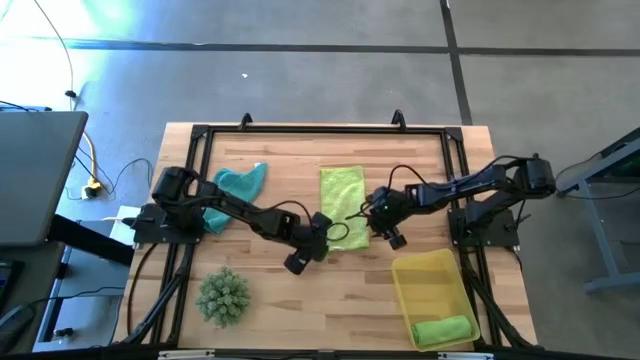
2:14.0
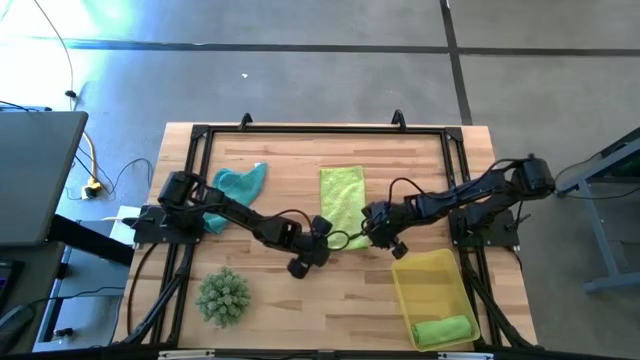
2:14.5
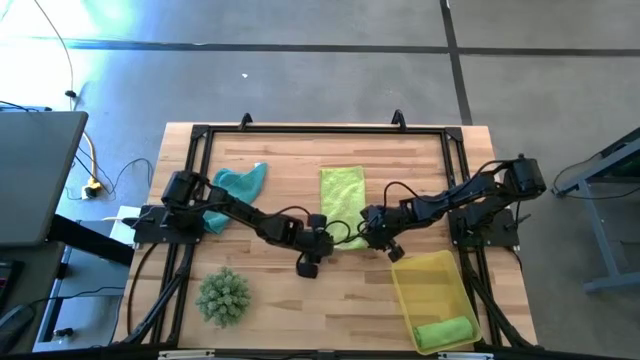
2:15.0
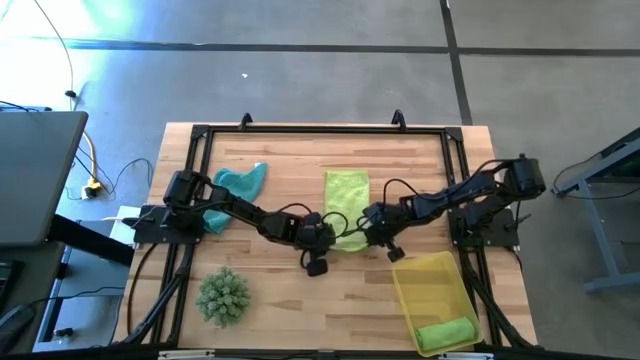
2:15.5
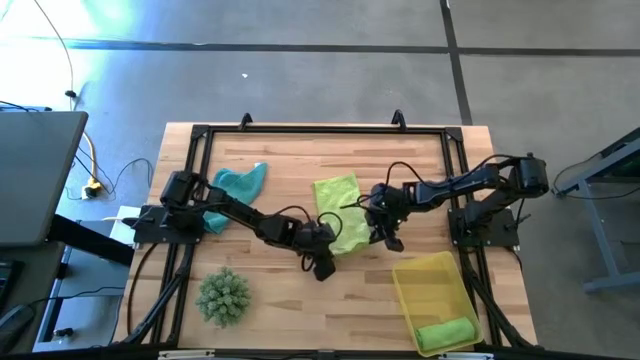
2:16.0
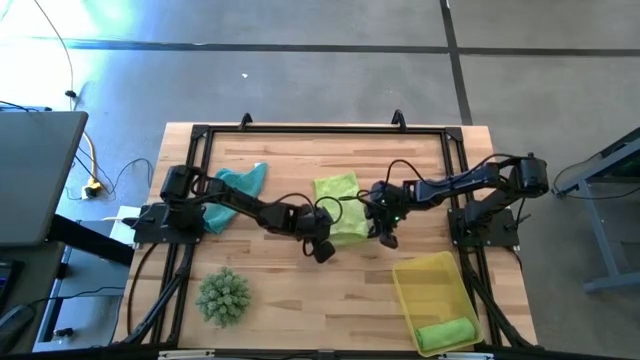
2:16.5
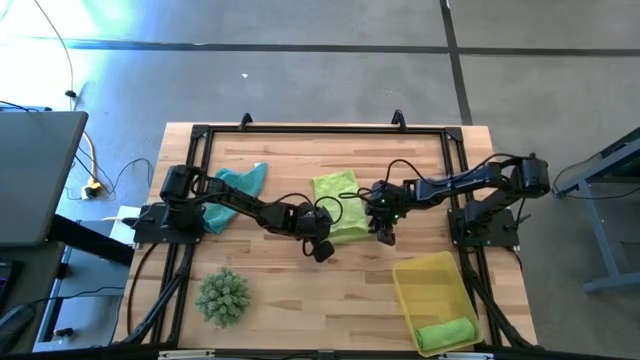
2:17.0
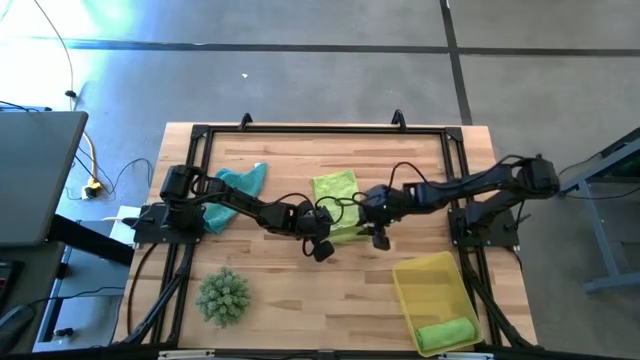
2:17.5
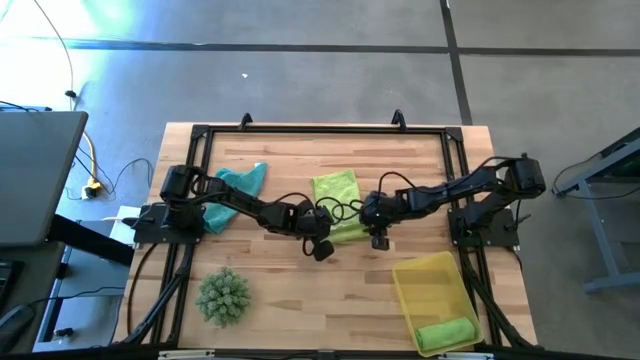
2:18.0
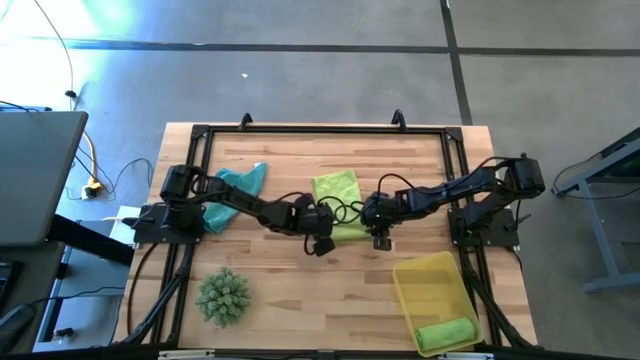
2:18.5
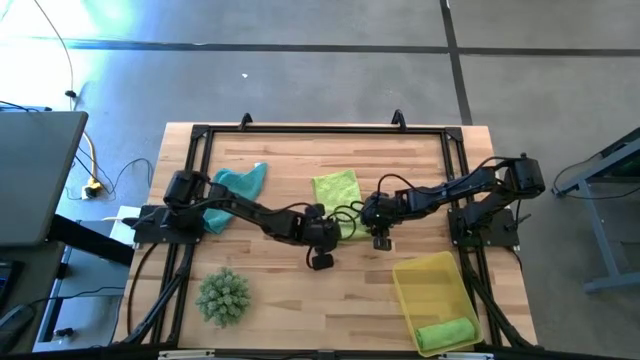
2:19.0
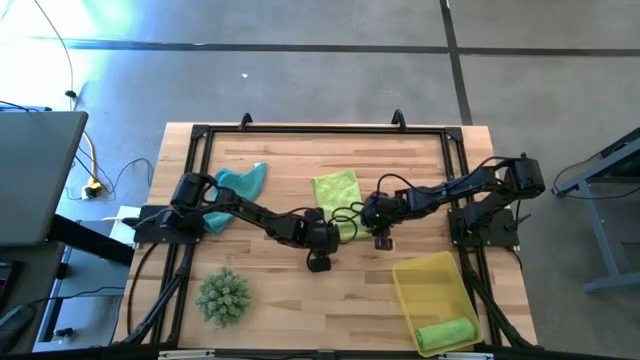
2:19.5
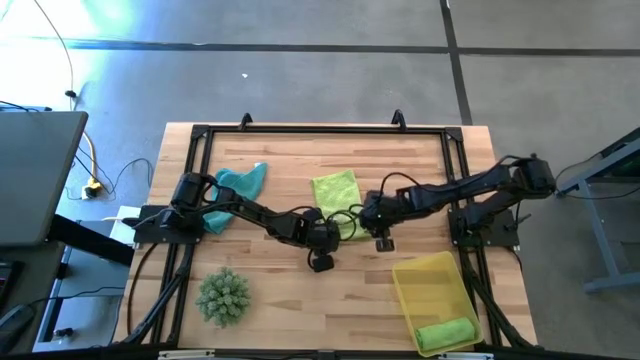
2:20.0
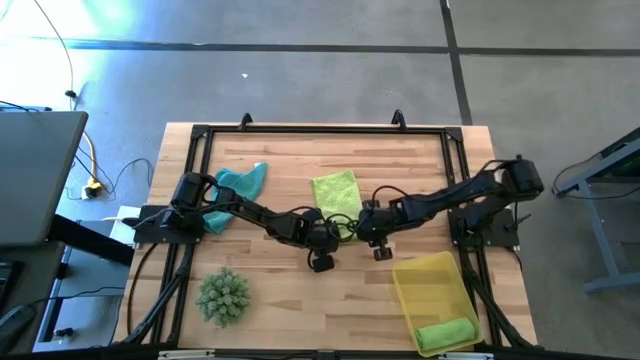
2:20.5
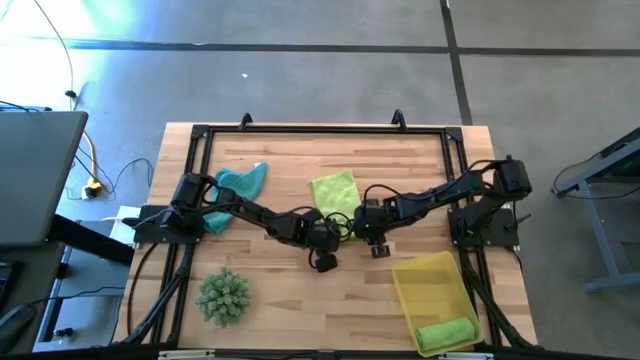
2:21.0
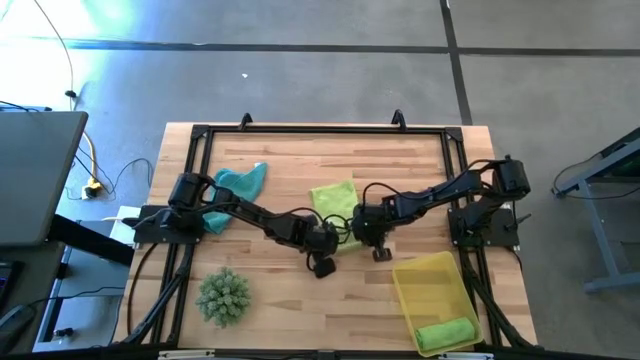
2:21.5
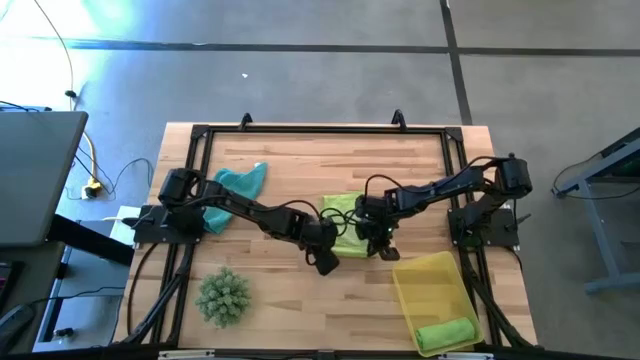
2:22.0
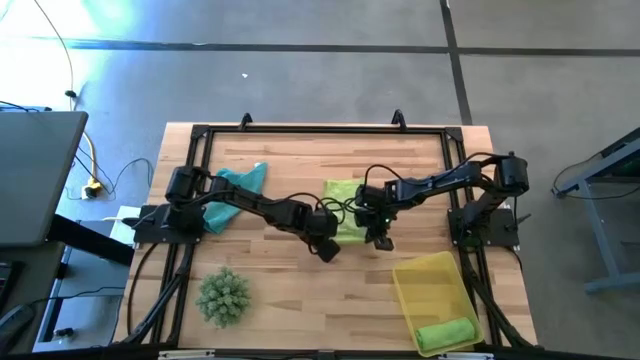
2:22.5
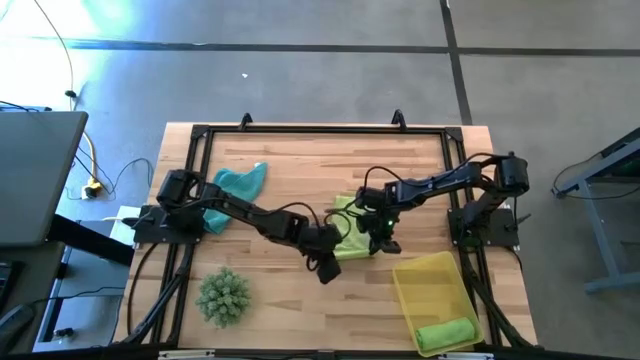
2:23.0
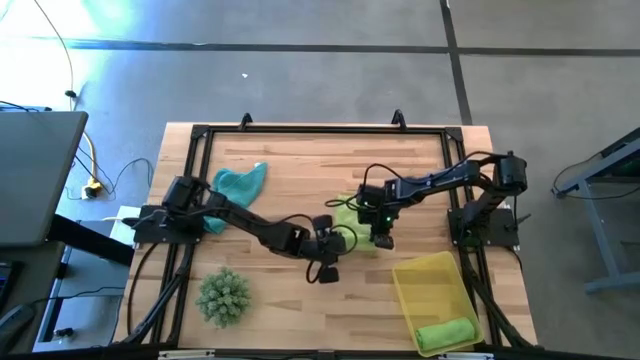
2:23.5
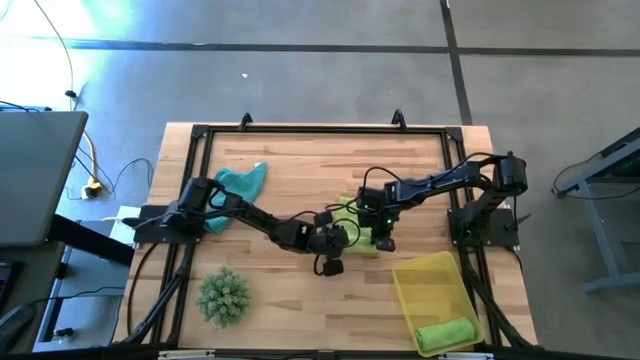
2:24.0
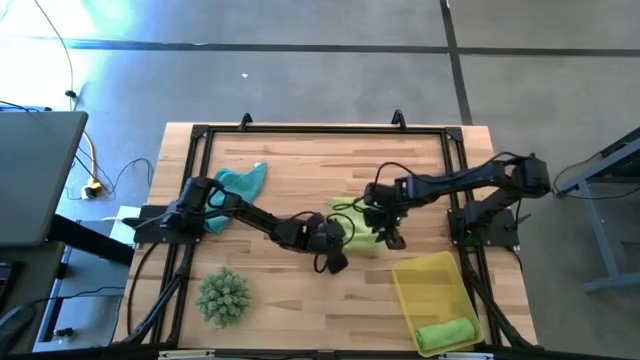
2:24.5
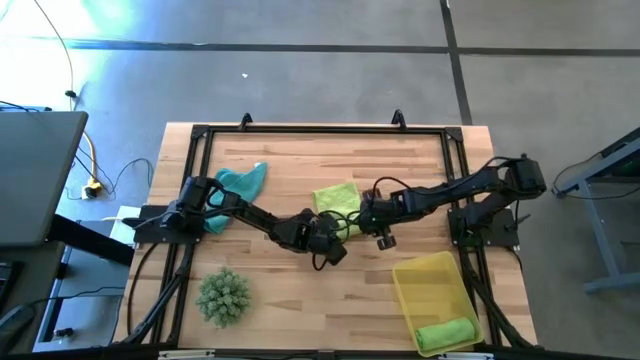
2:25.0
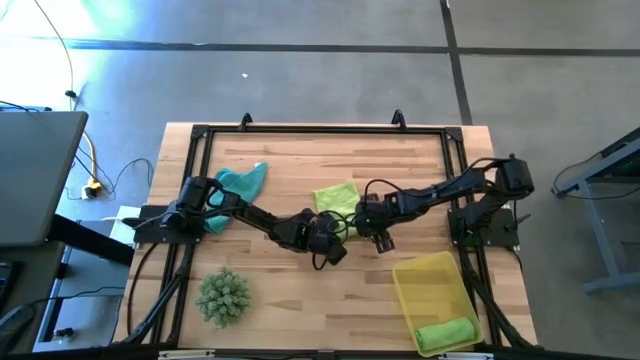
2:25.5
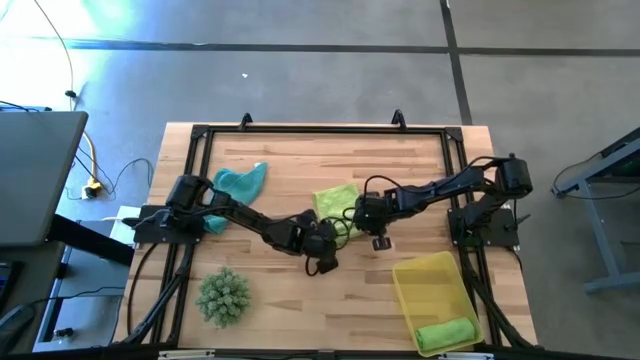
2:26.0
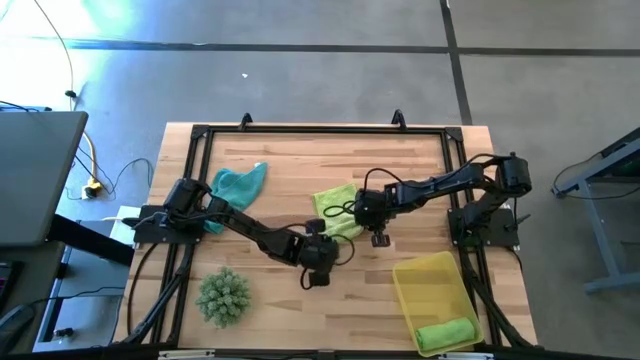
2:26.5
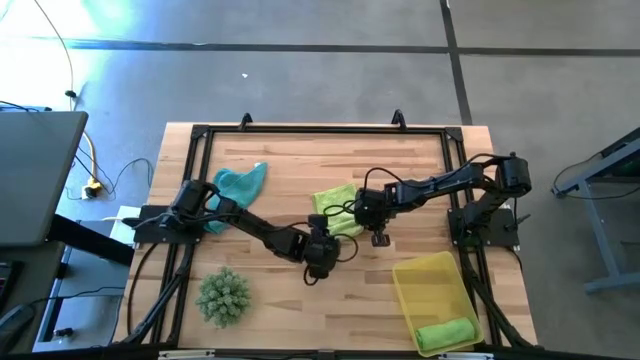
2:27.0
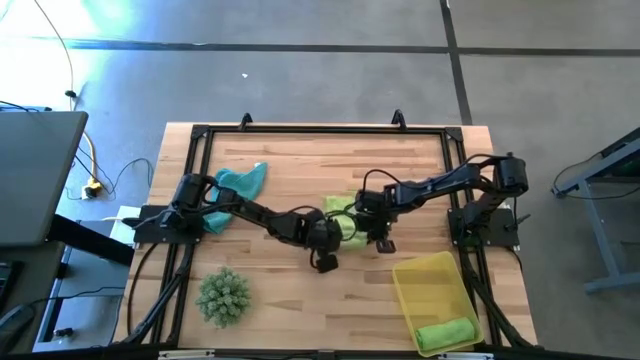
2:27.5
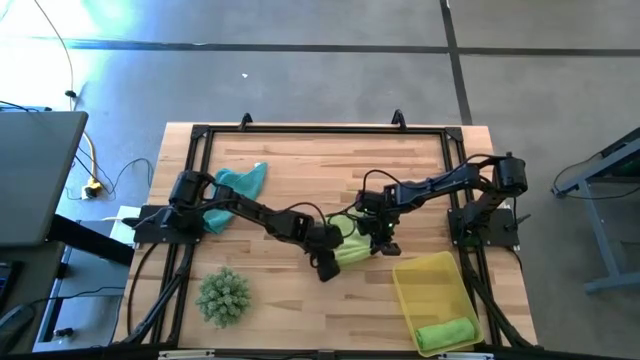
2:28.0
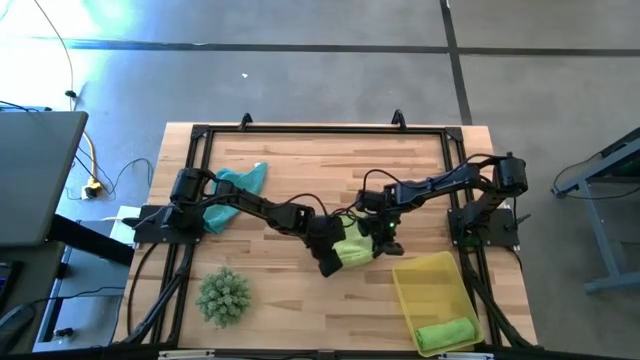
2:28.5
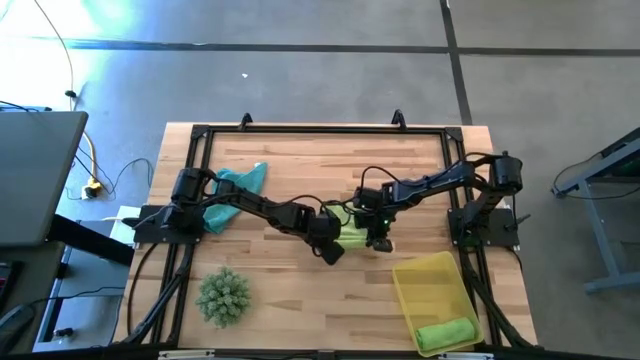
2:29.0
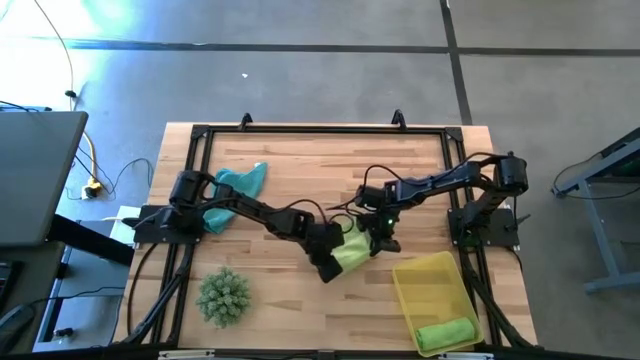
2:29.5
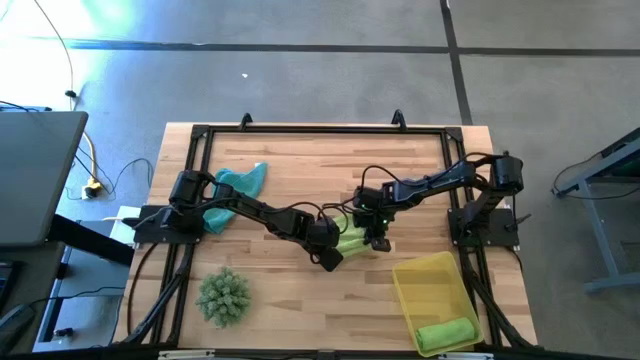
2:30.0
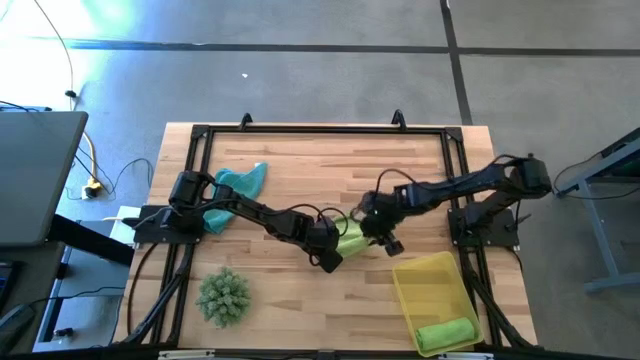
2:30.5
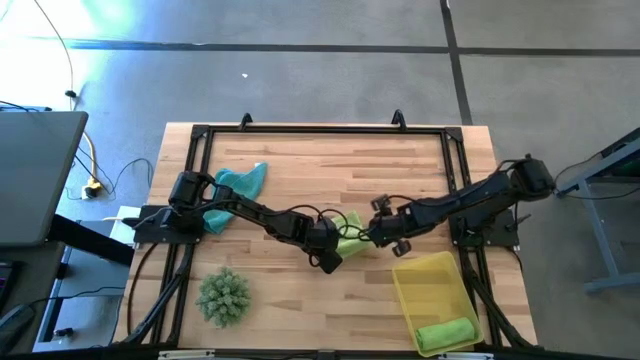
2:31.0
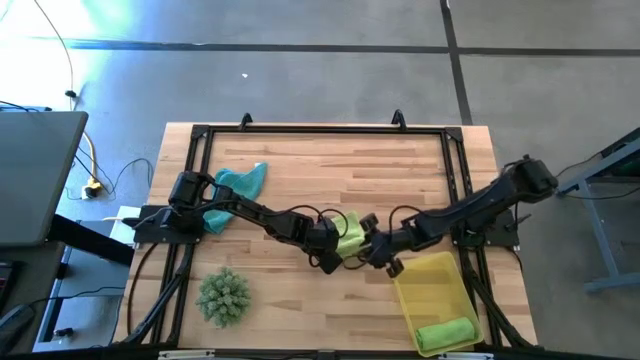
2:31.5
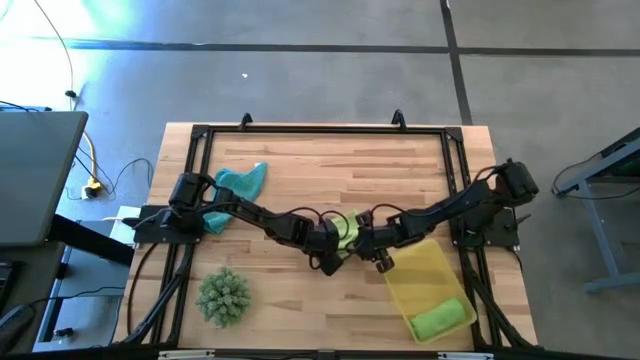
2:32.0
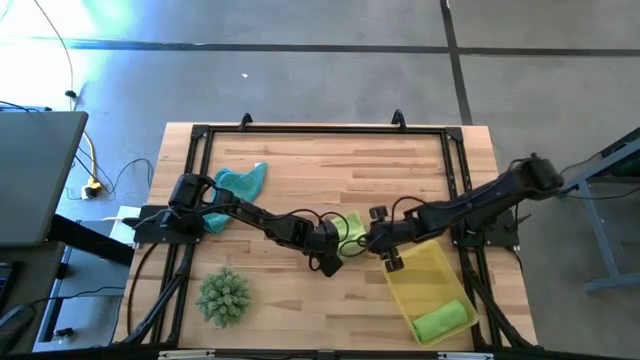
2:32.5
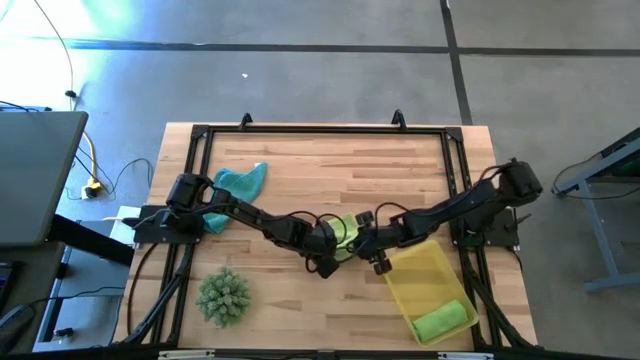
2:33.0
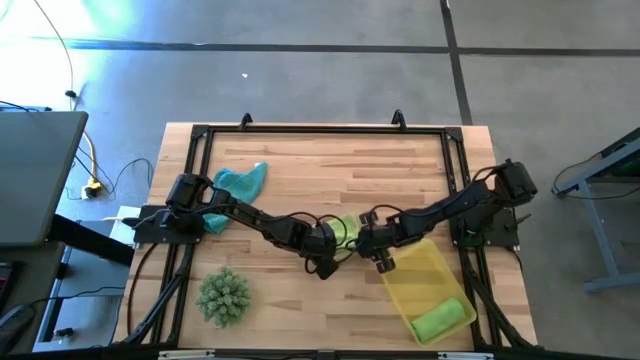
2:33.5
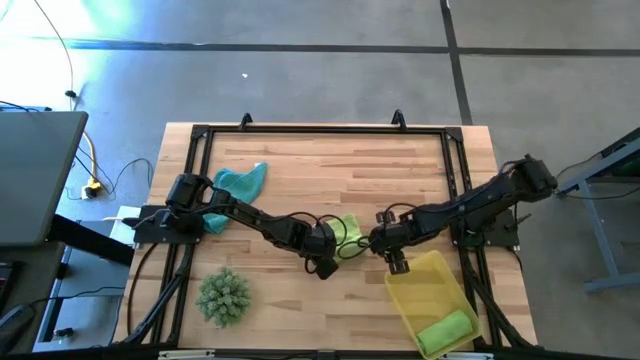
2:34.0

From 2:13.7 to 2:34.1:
Task: Roll microfiber towels into tight, uniform cylinder then place into a basket
Roll the light green microfiber cloth
